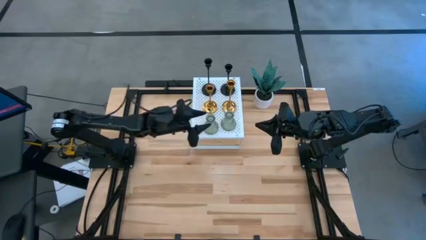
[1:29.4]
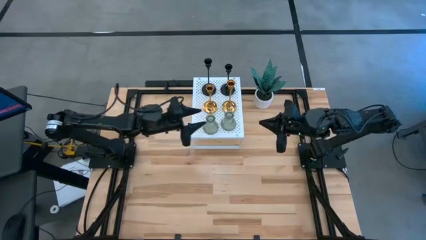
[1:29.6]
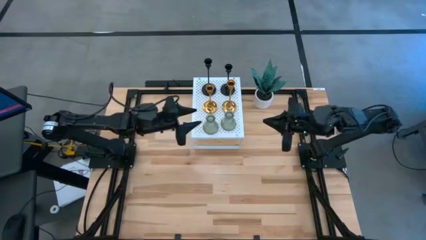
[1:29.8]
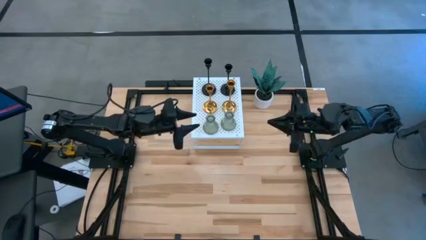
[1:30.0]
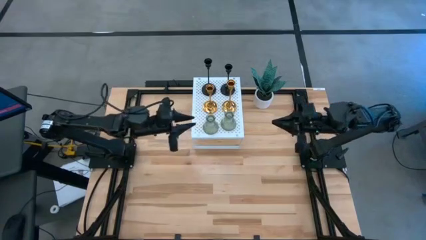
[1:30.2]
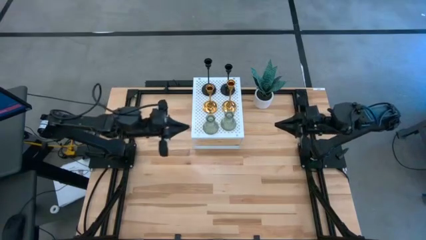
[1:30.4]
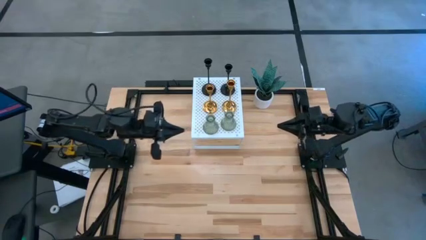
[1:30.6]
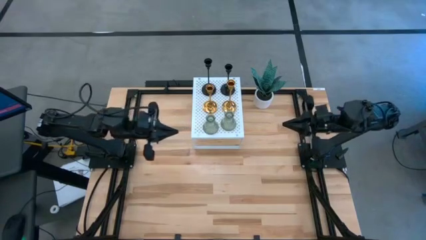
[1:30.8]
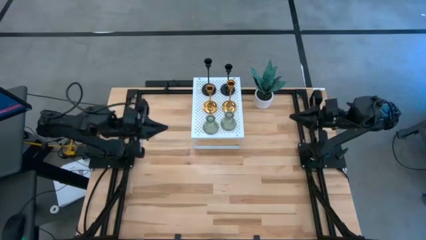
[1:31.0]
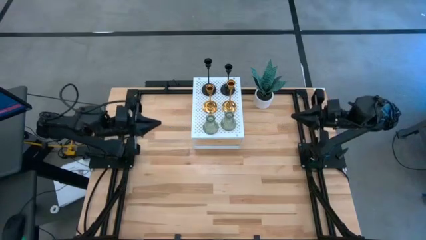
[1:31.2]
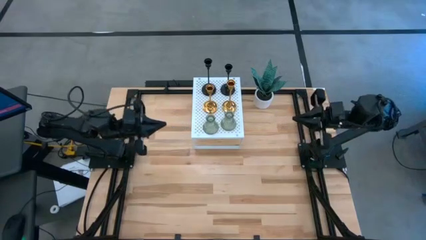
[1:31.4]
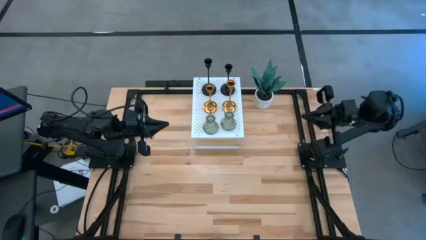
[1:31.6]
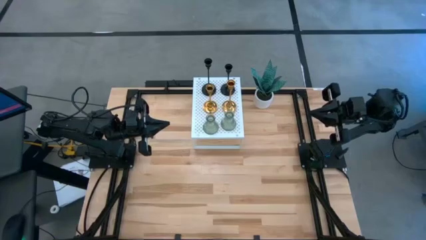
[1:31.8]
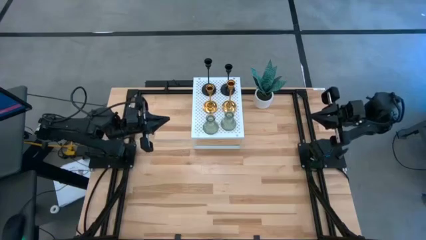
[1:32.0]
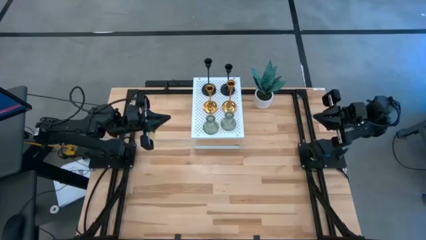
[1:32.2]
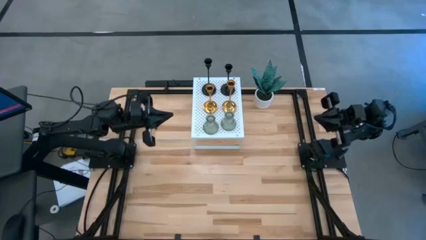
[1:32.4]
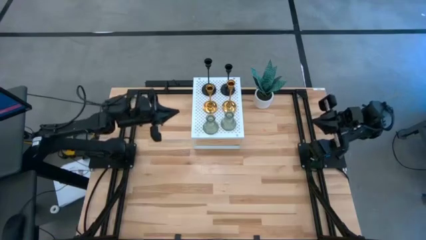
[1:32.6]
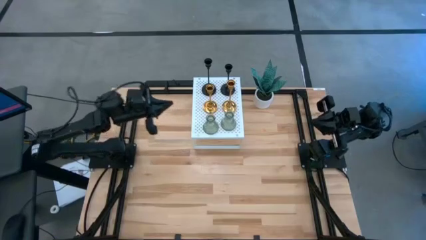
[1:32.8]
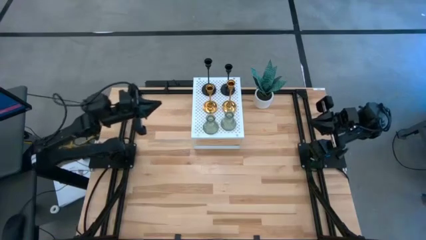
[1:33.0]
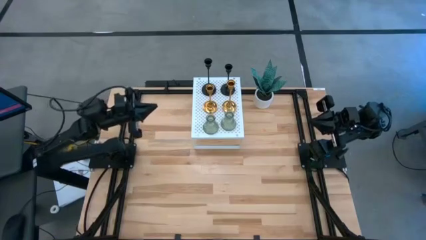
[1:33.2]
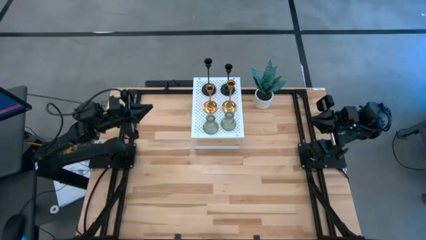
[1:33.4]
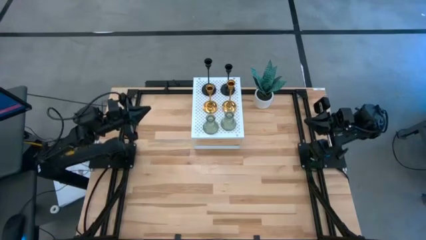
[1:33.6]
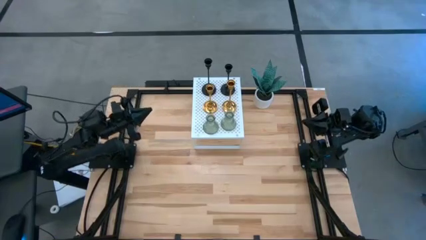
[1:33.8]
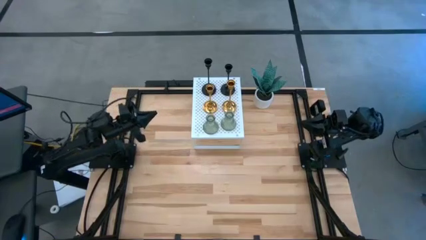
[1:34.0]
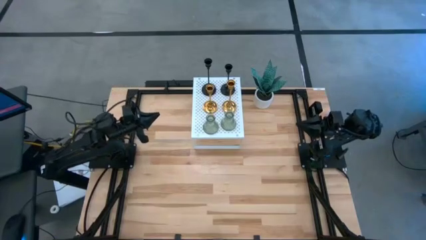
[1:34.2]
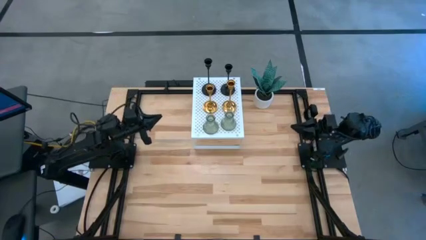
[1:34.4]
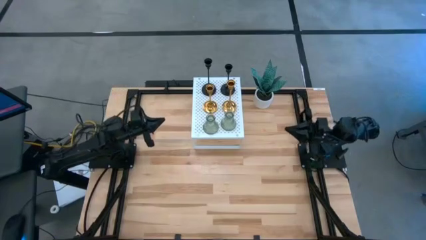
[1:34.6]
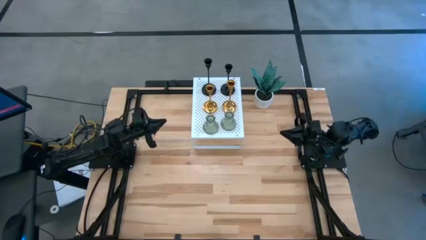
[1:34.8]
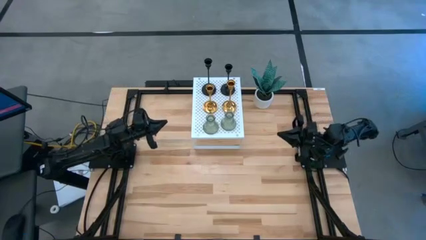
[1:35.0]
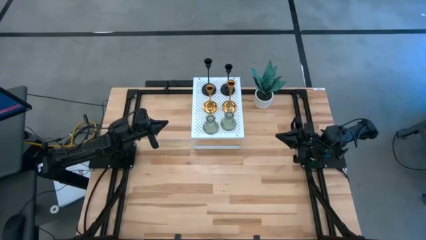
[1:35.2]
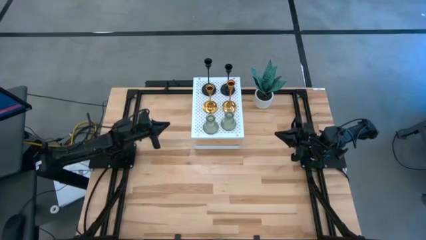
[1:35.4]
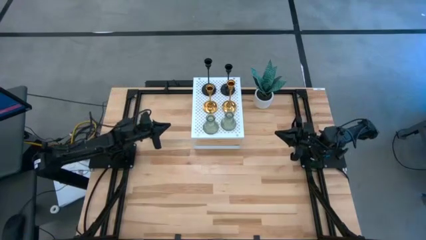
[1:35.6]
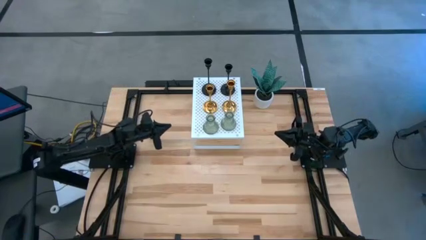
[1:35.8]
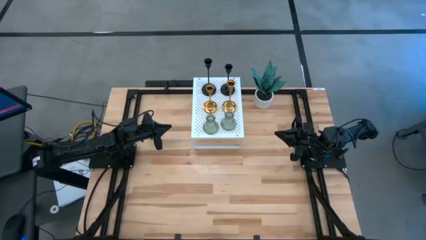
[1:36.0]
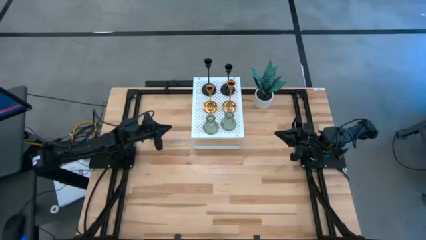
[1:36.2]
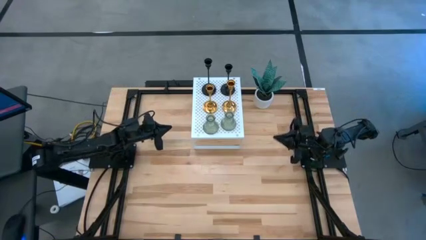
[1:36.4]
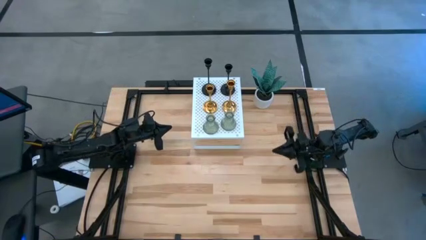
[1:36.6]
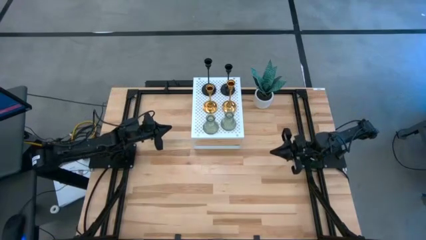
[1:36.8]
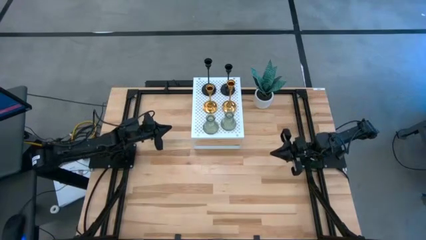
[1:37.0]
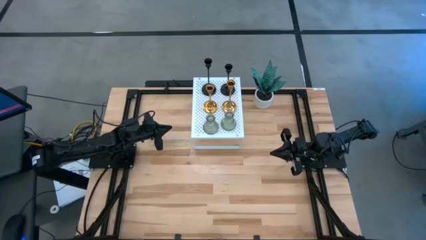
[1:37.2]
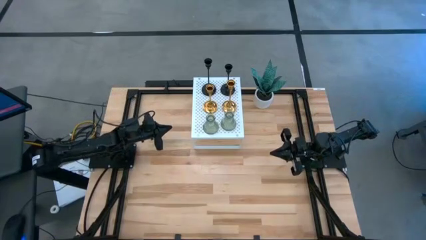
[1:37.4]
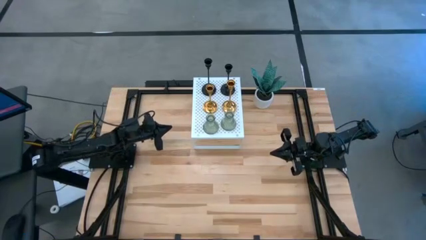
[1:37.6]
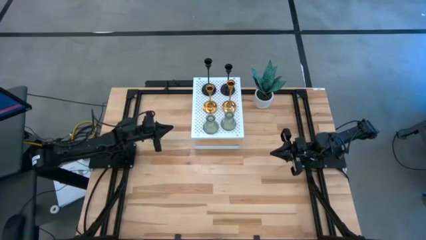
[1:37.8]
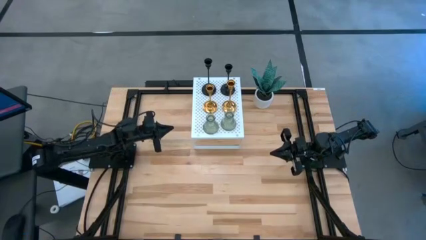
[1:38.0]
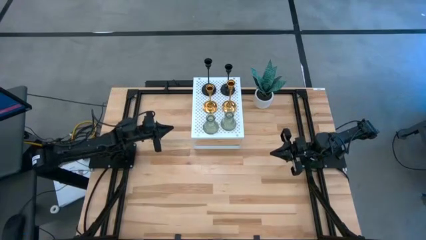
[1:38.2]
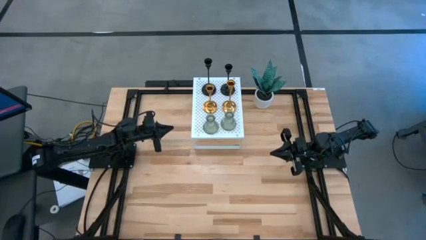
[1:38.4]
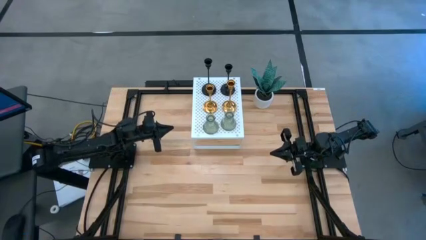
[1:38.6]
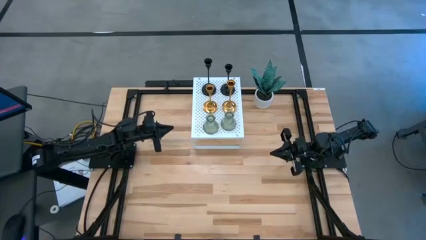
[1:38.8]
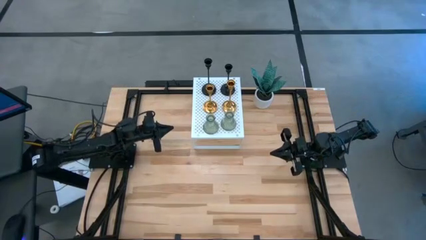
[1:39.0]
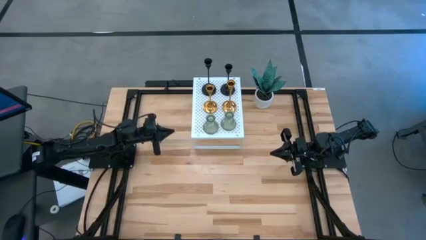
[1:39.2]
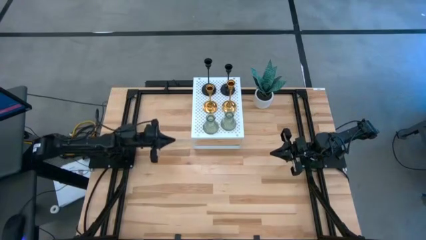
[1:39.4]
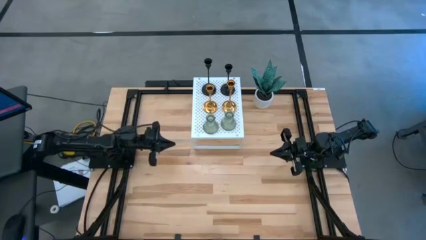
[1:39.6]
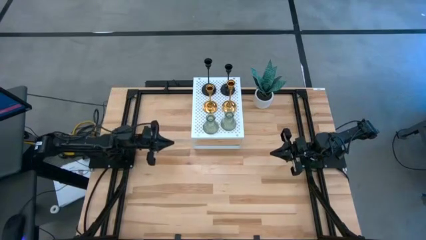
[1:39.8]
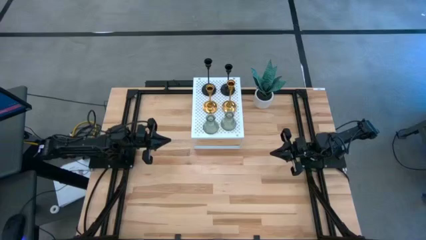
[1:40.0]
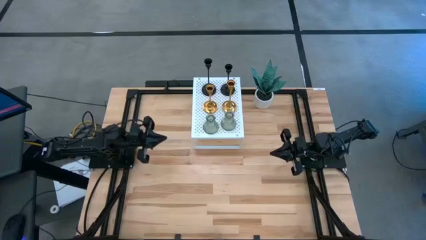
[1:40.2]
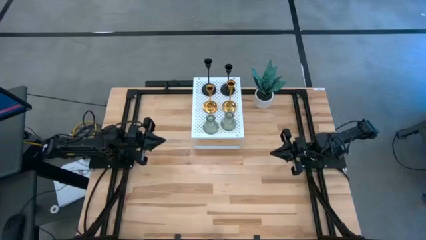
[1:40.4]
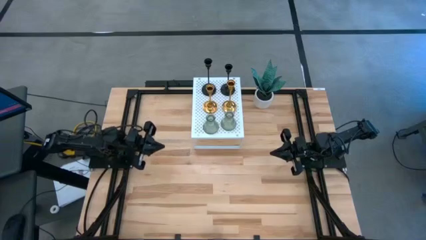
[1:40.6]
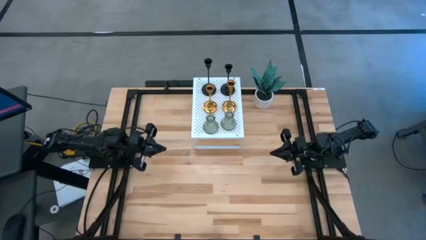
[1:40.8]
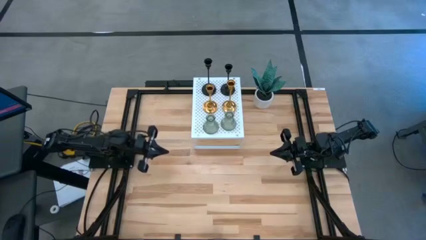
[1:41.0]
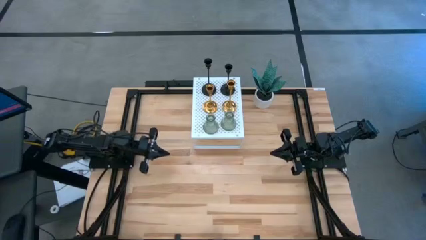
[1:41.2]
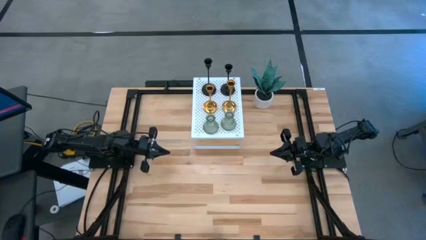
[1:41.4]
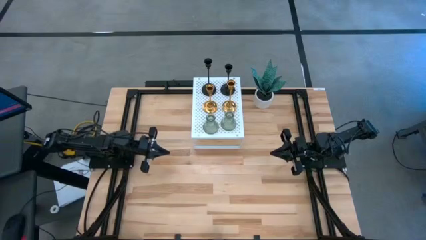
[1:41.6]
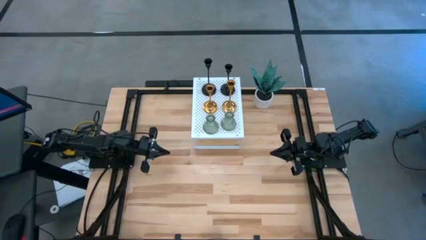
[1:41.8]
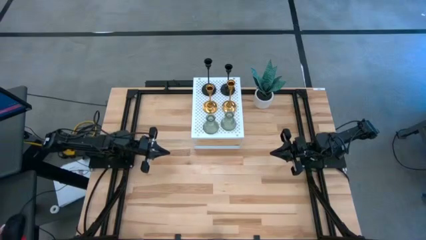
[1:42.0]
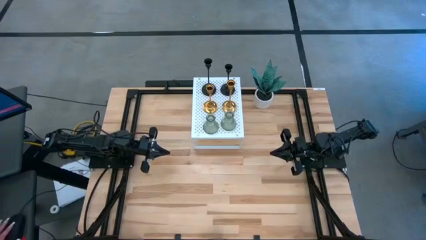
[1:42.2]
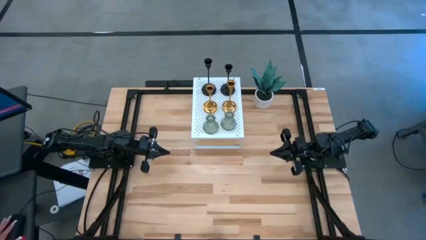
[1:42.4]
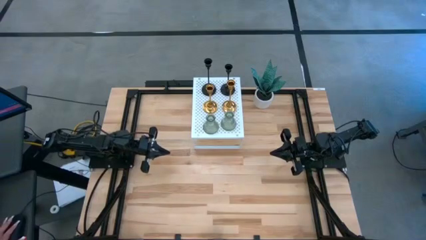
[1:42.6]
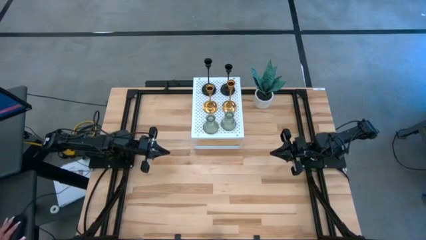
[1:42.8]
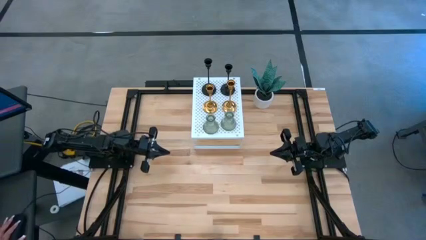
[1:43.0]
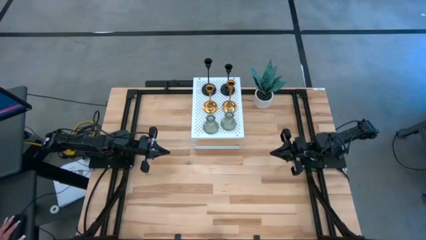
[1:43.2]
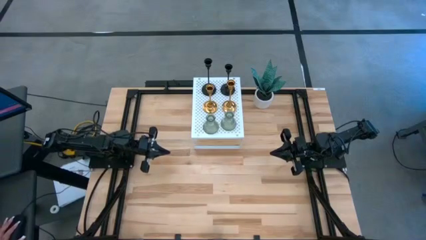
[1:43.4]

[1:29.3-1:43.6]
Task: Pick & Place candle stick holders
Return to Home Position
